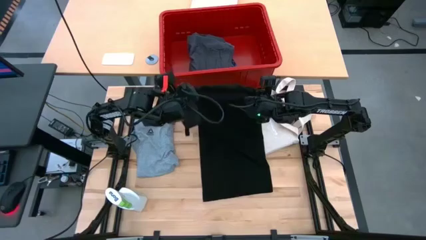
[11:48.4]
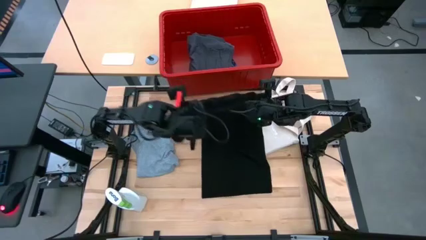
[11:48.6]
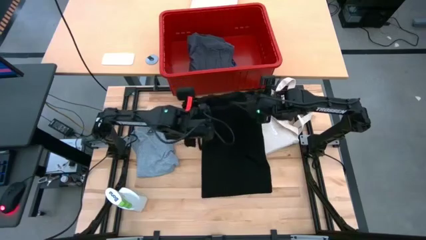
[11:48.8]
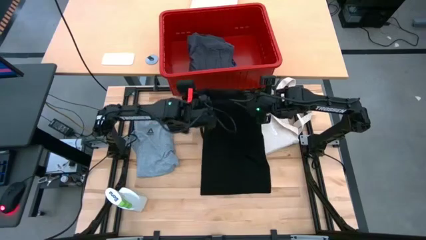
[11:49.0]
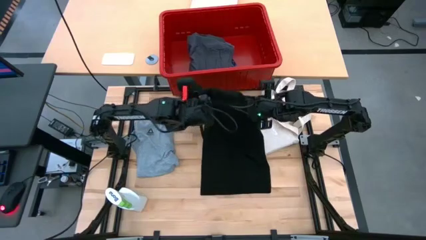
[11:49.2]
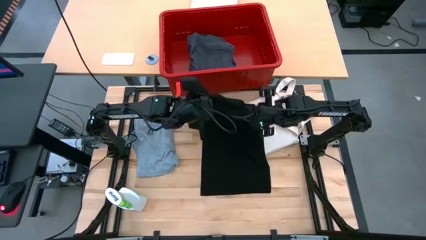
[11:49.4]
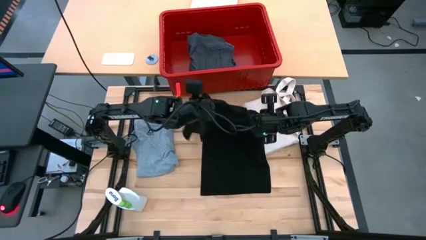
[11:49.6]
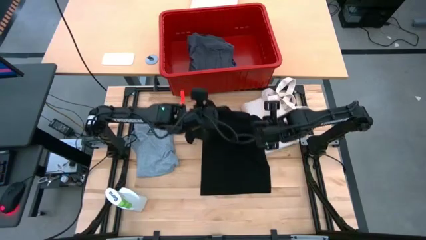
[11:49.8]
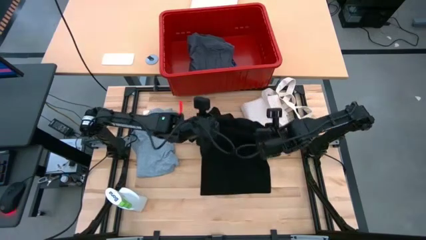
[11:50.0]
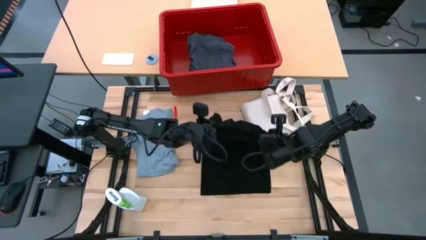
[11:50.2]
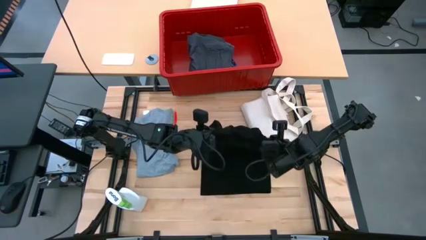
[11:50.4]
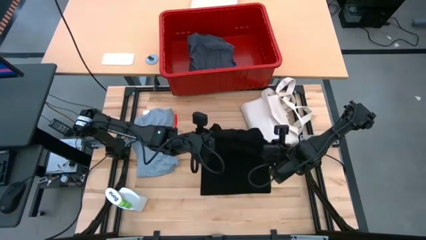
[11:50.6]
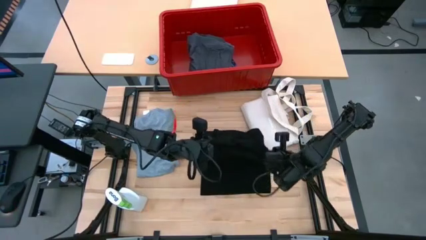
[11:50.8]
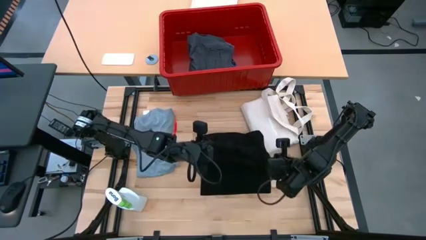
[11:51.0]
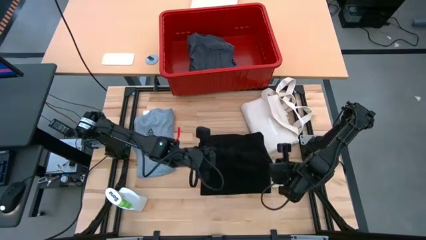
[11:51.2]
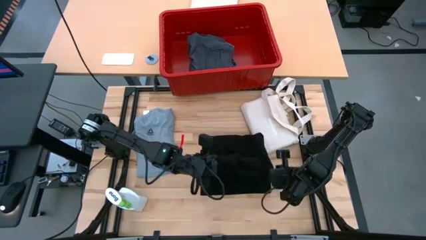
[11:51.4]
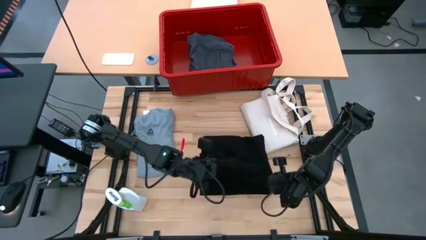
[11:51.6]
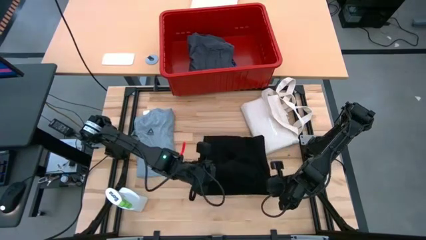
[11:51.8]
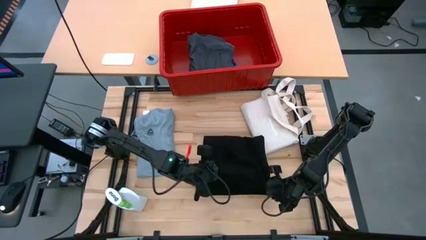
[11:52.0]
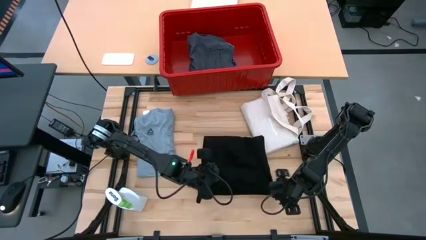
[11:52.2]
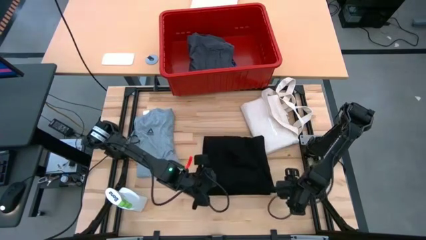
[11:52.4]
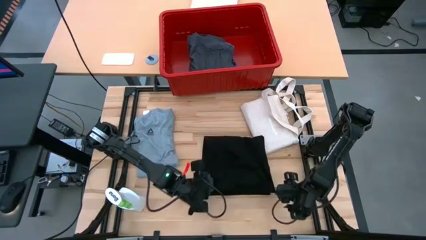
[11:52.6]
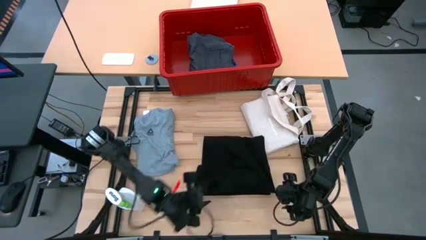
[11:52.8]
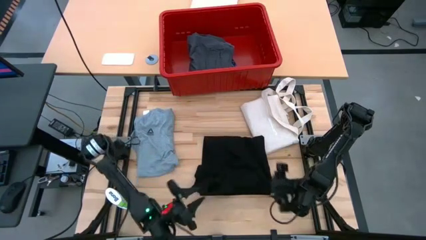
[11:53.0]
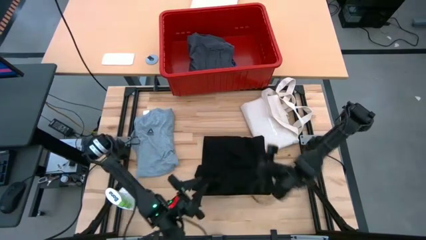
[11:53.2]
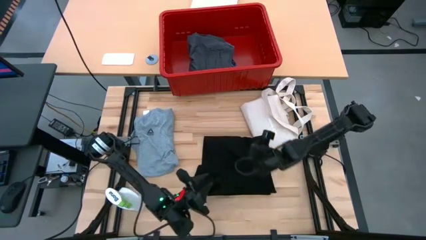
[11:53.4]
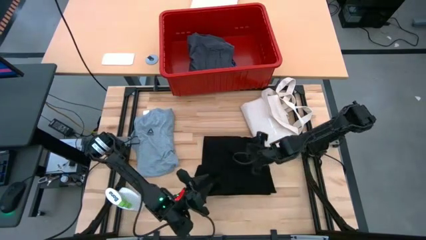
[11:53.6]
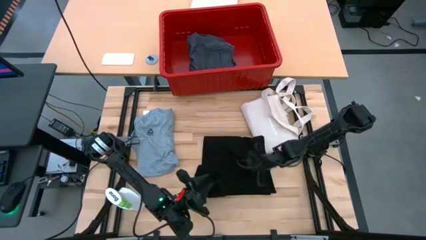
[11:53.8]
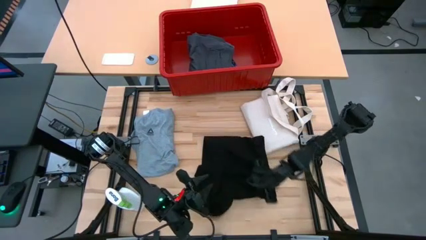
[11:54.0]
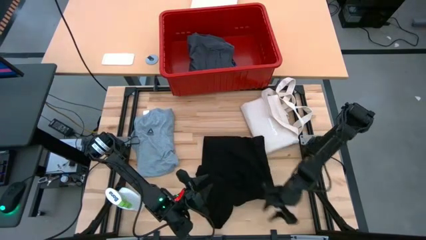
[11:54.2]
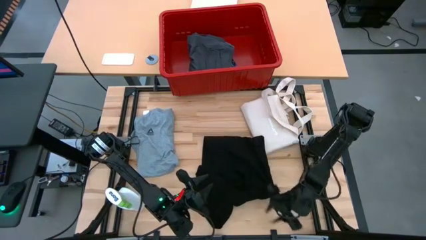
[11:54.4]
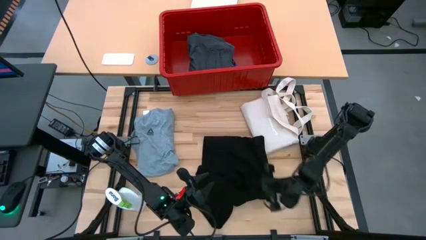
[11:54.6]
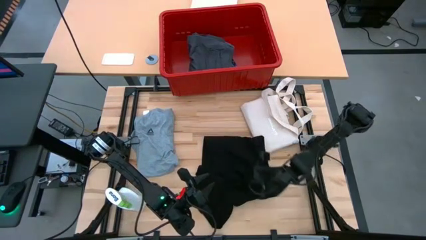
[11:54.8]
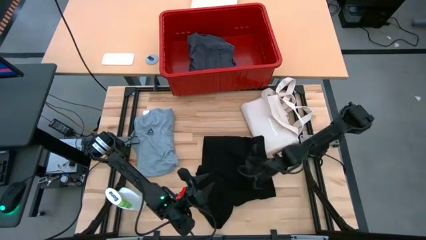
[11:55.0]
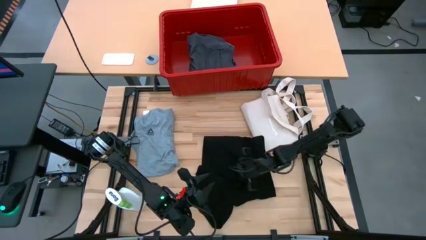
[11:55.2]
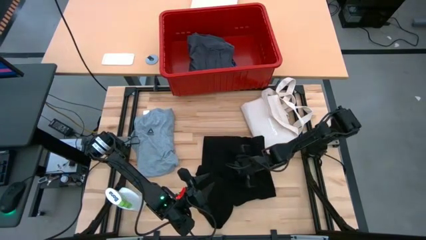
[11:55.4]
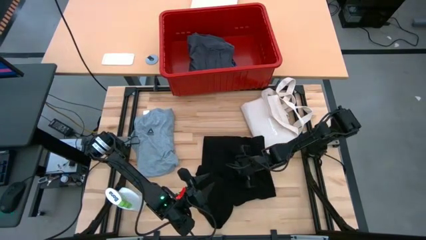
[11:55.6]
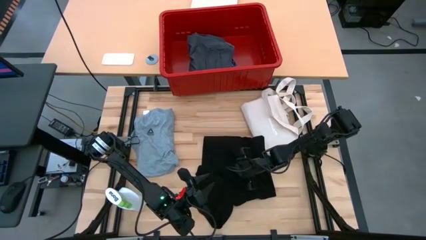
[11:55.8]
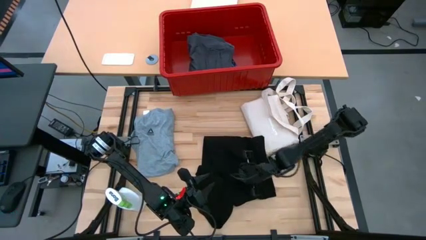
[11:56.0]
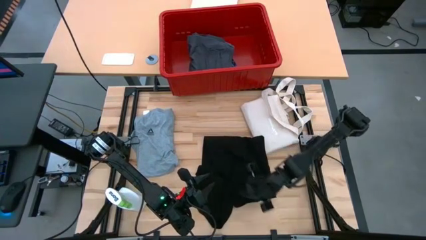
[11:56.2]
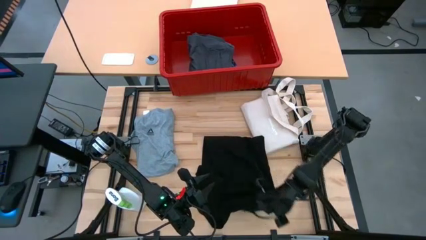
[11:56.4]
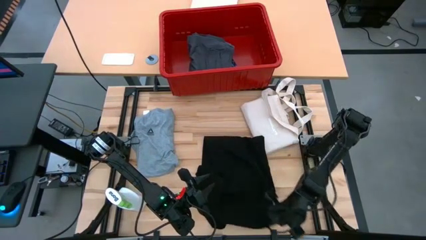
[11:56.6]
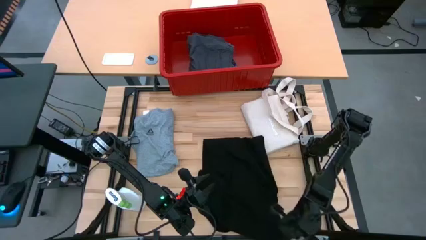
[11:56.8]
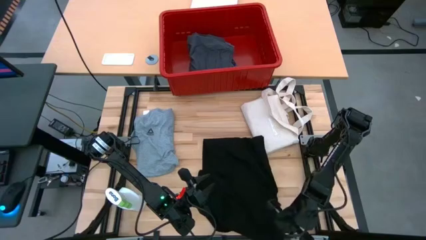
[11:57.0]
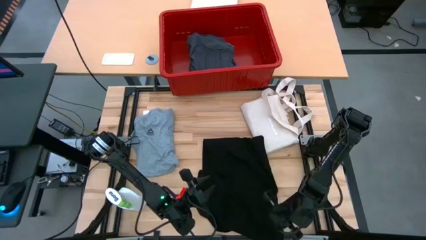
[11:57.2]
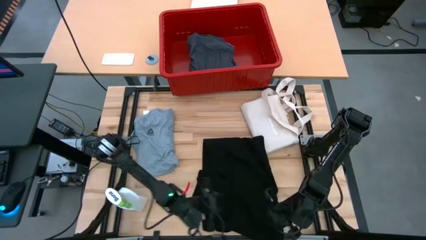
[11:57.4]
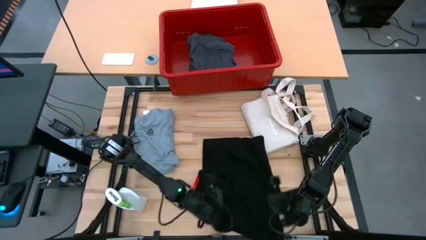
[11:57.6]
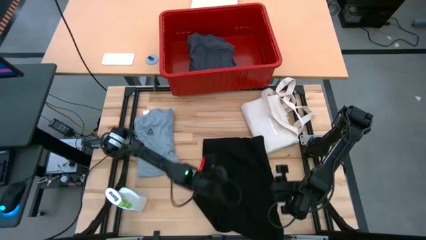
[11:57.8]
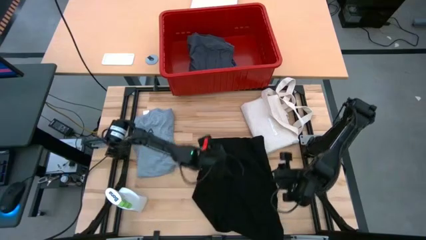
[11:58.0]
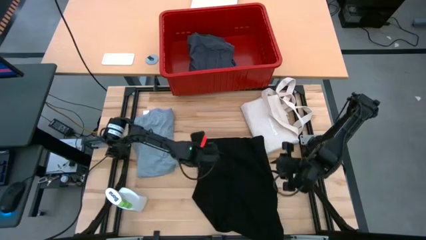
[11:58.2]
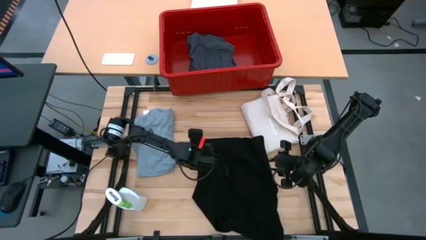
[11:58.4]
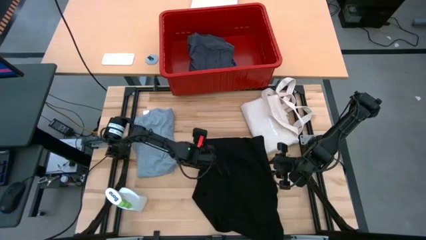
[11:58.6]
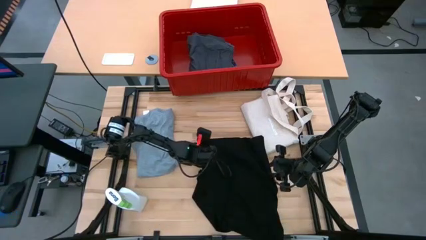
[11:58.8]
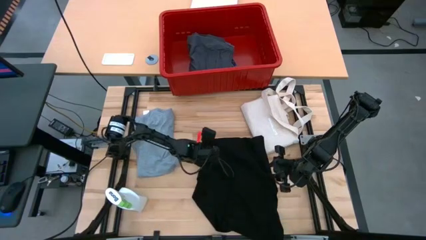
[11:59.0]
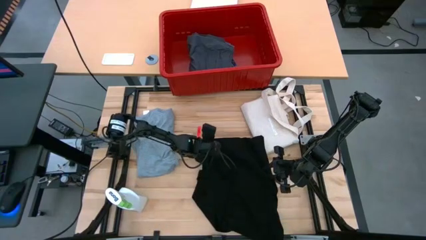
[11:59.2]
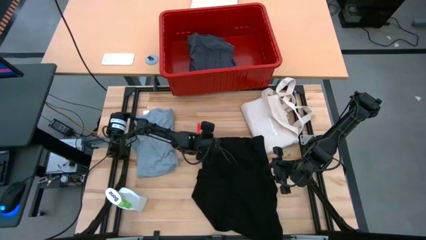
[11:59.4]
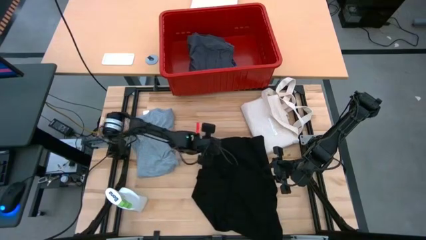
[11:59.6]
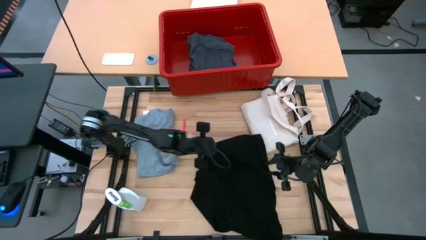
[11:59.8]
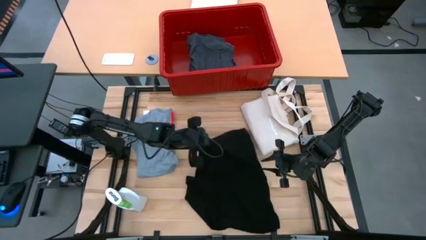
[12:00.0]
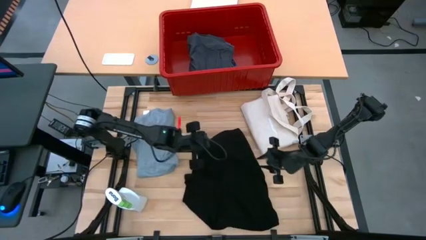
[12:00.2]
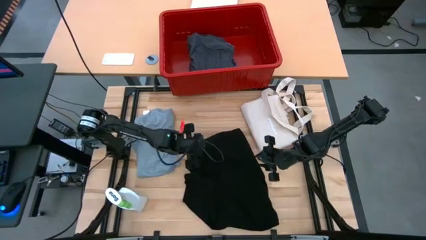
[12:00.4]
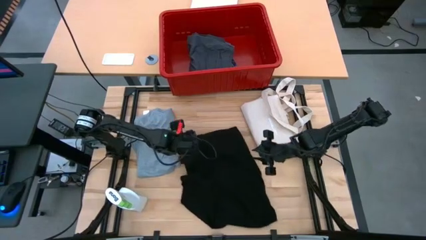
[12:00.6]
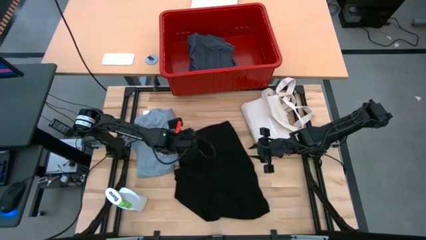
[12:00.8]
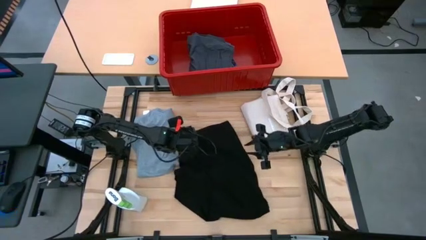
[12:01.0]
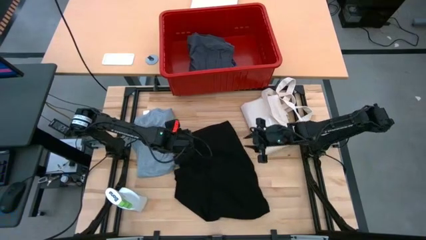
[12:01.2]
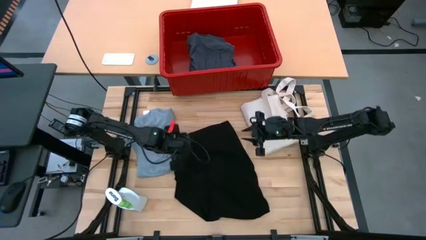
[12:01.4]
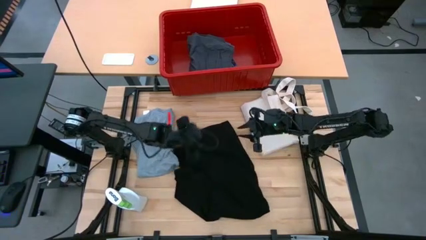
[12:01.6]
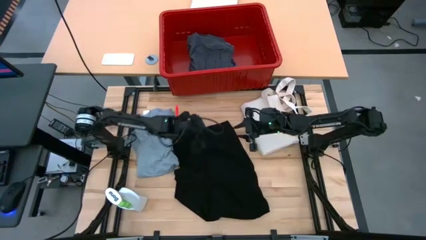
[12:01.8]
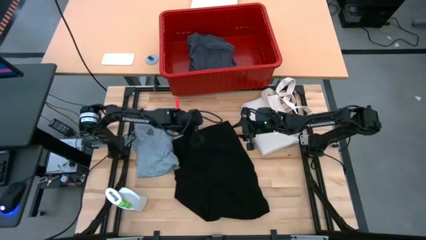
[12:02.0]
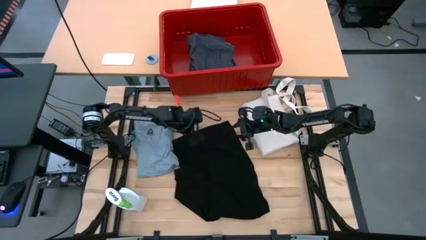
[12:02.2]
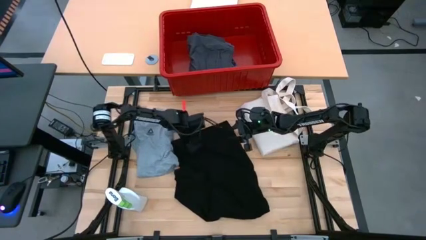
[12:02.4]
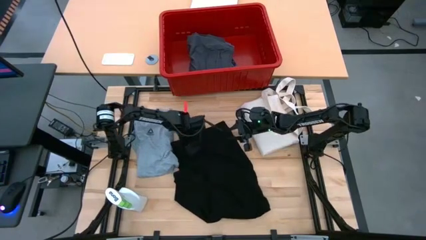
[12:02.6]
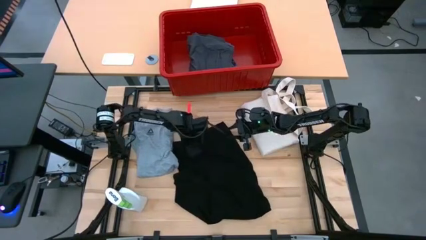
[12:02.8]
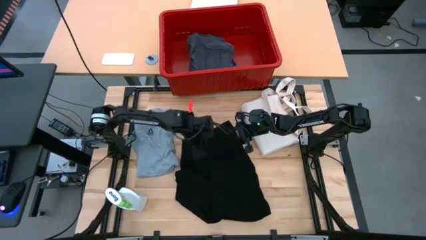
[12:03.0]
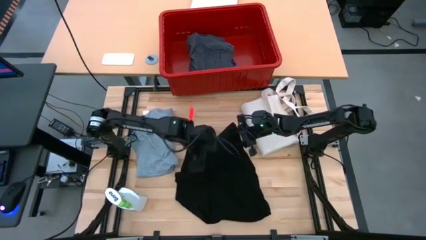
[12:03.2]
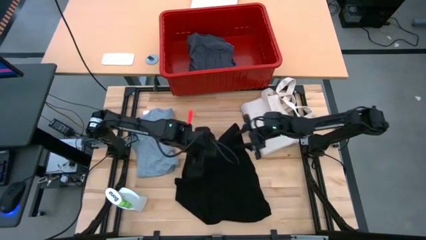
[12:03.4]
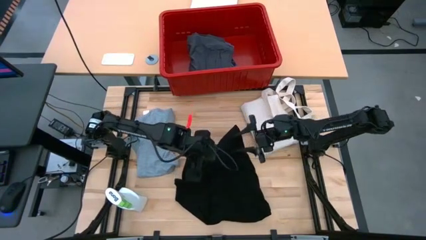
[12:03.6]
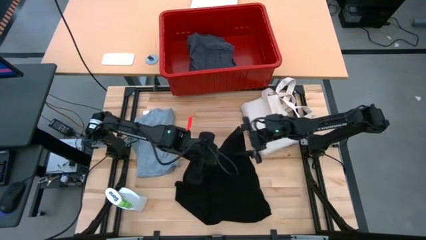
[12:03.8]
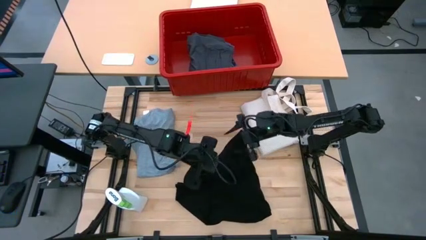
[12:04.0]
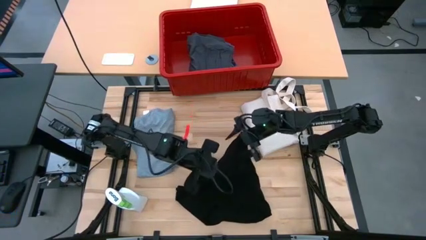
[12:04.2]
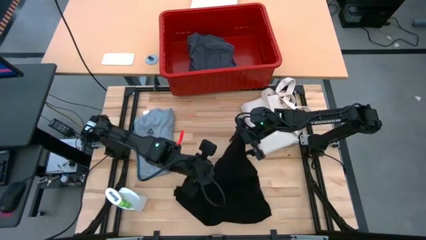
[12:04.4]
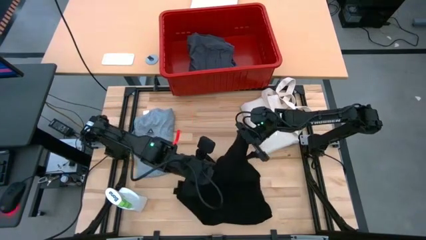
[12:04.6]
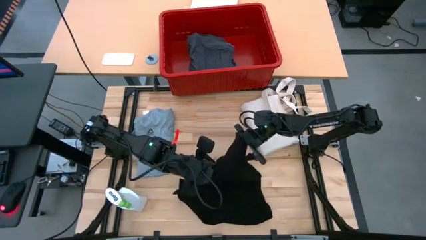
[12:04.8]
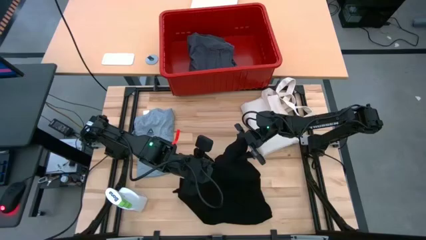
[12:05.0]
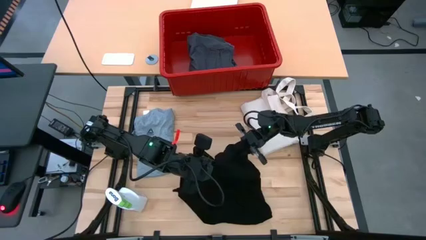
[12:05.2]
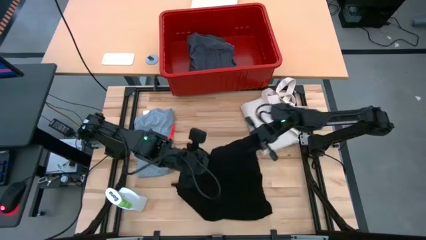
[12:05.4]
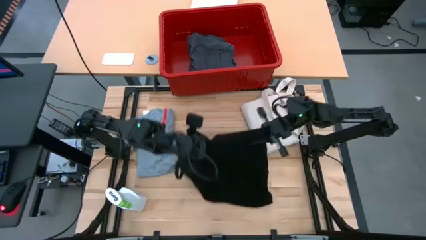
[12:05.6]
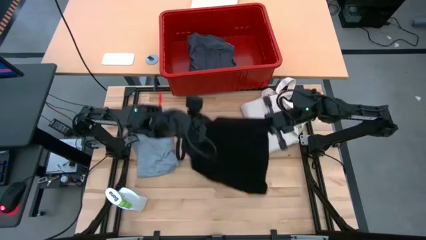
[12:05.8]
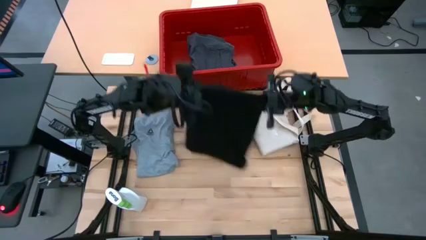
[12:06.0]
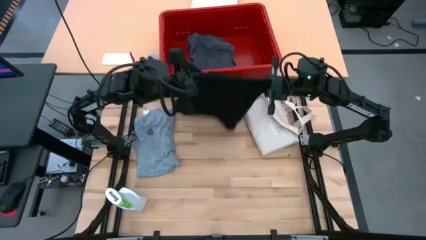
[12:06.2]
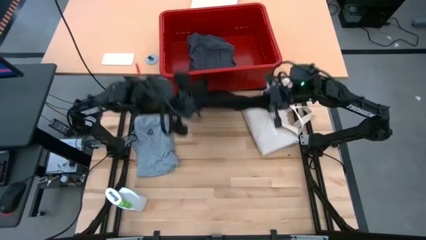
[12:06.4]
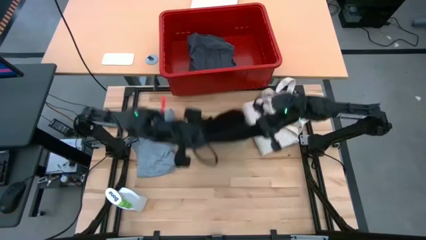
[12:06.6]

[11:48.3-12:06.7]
Task: Fold Laundry from Bin
Fold the black shirt
